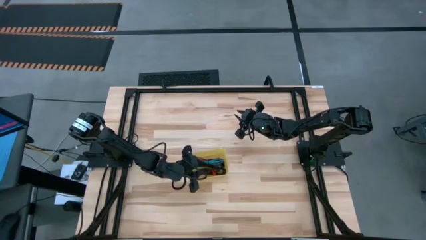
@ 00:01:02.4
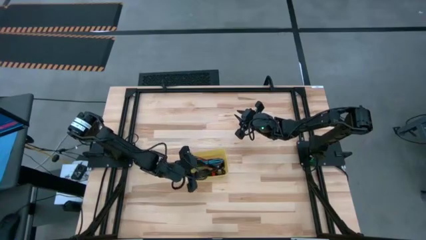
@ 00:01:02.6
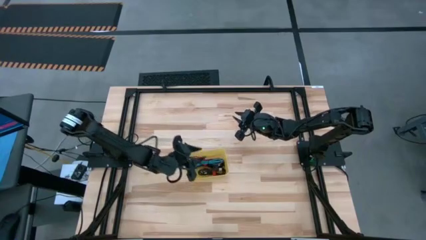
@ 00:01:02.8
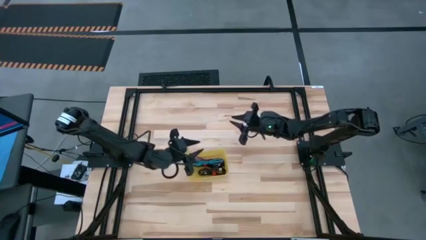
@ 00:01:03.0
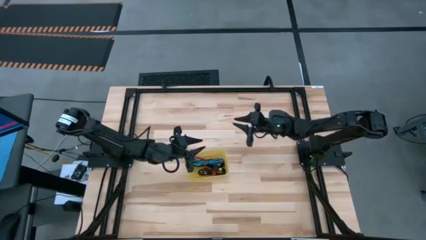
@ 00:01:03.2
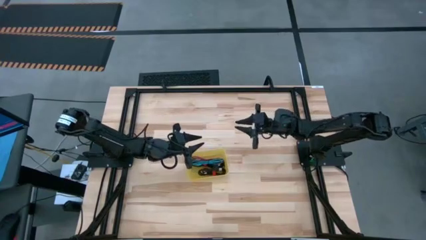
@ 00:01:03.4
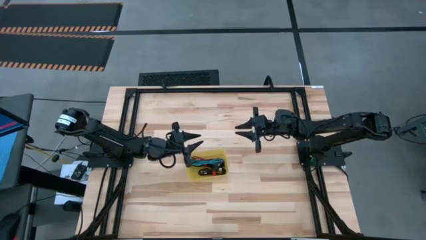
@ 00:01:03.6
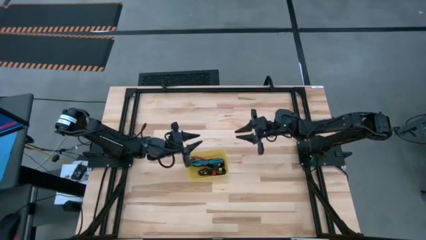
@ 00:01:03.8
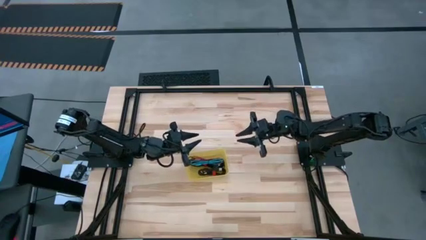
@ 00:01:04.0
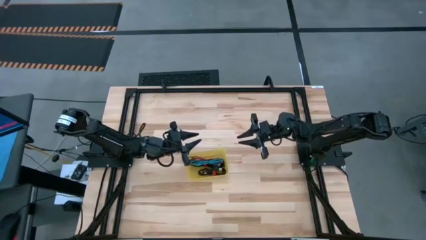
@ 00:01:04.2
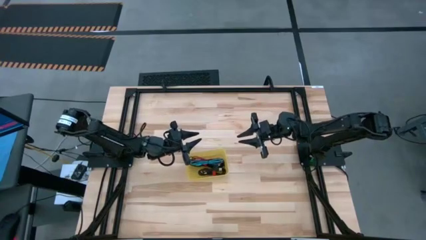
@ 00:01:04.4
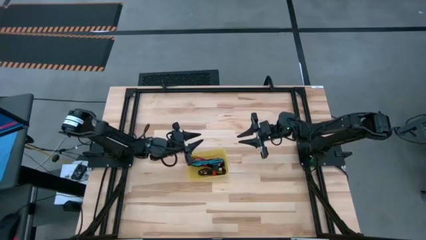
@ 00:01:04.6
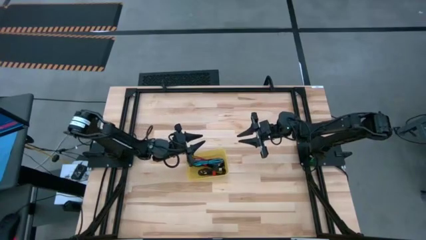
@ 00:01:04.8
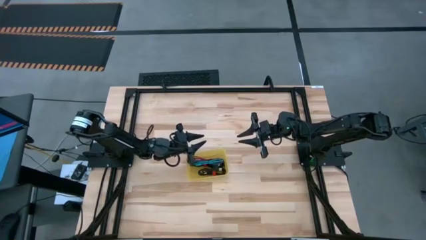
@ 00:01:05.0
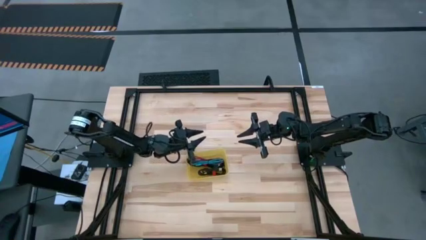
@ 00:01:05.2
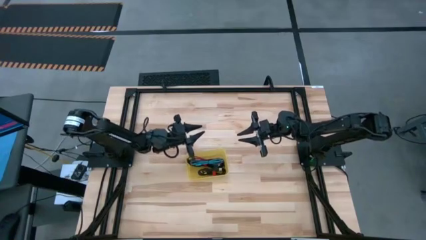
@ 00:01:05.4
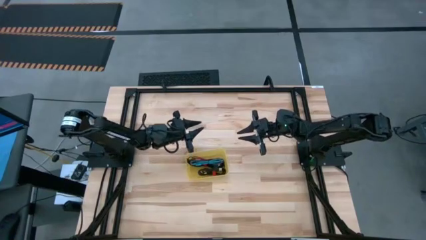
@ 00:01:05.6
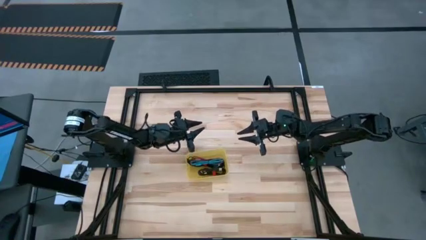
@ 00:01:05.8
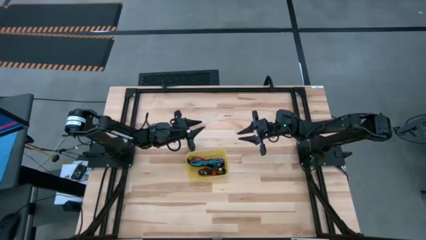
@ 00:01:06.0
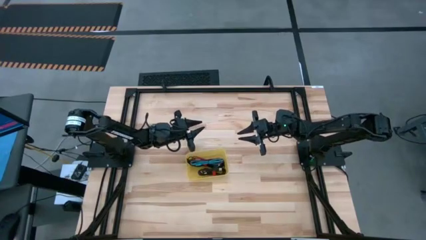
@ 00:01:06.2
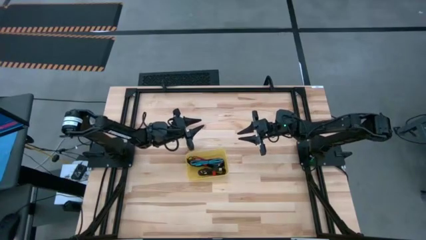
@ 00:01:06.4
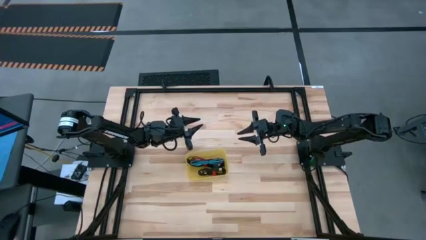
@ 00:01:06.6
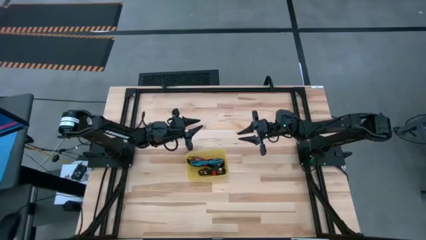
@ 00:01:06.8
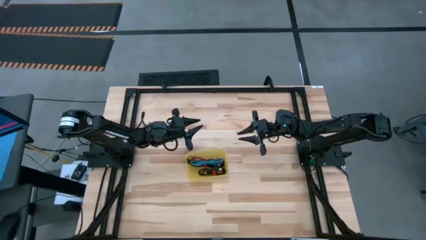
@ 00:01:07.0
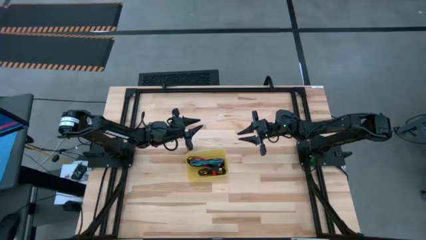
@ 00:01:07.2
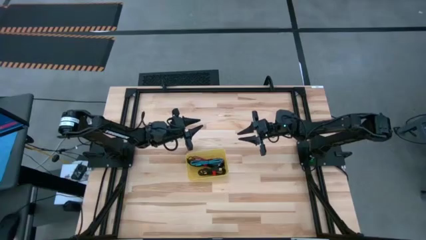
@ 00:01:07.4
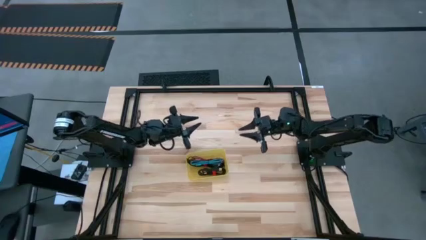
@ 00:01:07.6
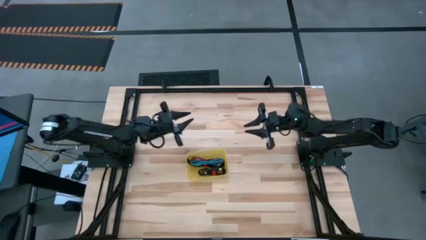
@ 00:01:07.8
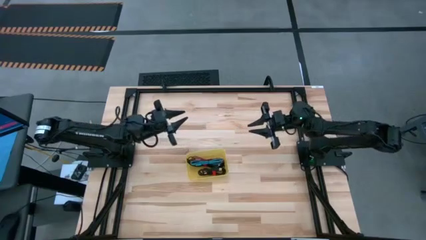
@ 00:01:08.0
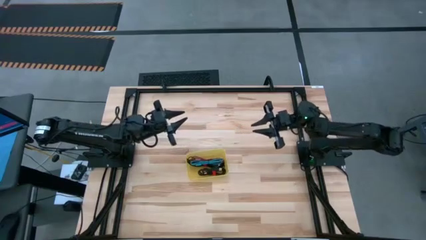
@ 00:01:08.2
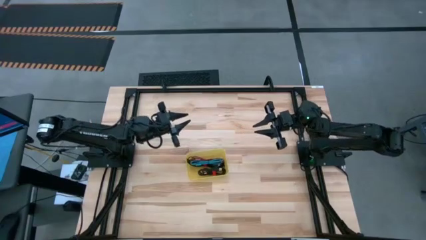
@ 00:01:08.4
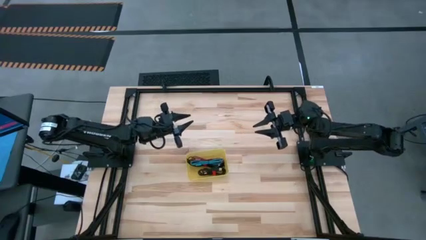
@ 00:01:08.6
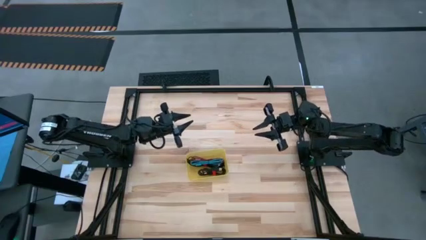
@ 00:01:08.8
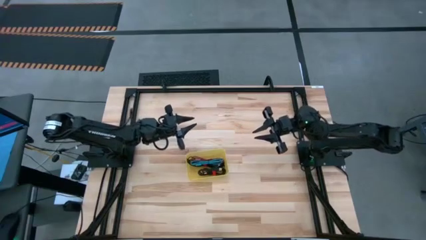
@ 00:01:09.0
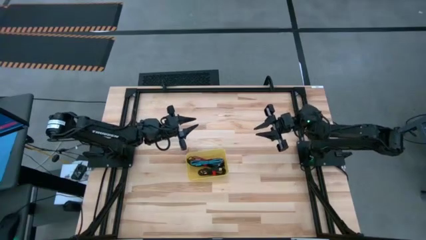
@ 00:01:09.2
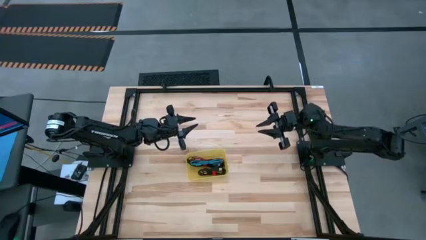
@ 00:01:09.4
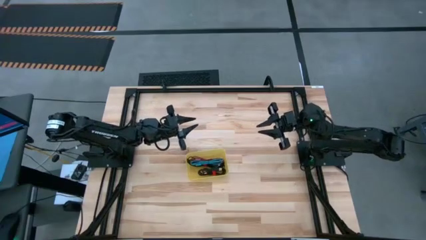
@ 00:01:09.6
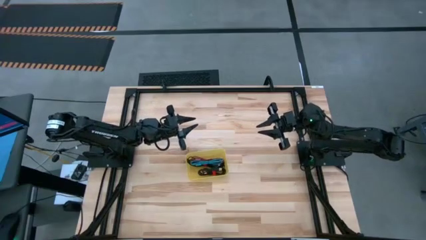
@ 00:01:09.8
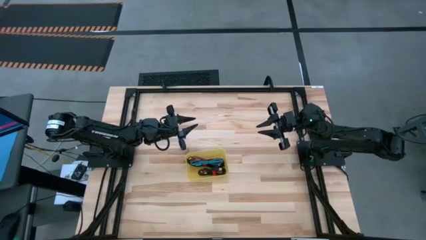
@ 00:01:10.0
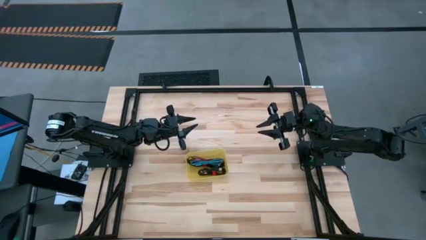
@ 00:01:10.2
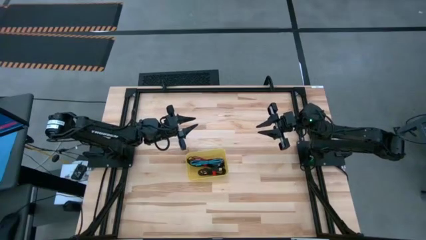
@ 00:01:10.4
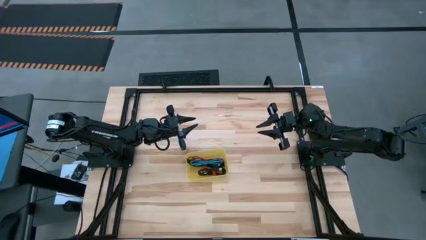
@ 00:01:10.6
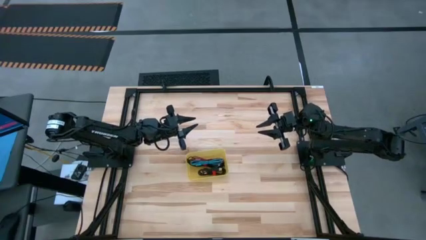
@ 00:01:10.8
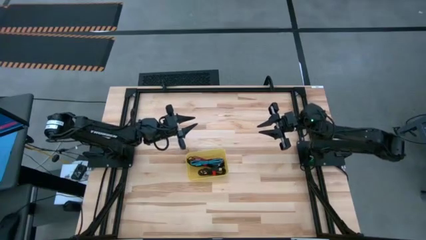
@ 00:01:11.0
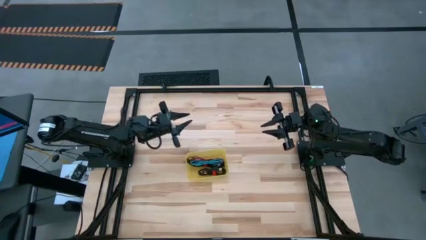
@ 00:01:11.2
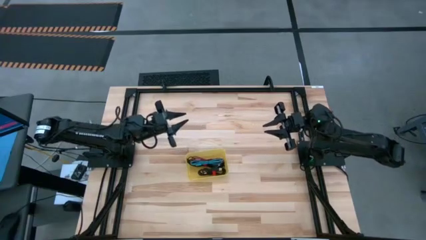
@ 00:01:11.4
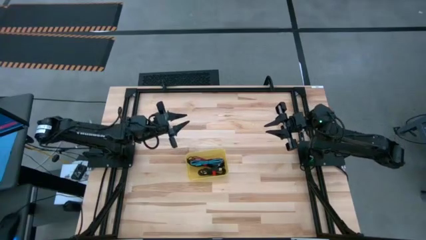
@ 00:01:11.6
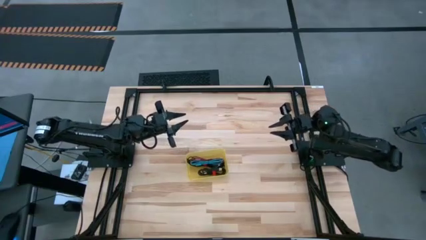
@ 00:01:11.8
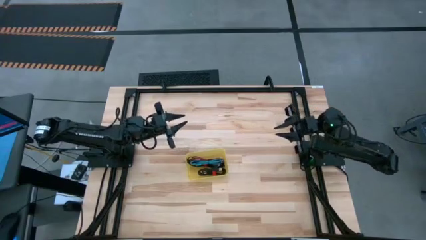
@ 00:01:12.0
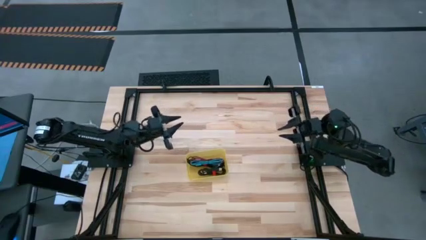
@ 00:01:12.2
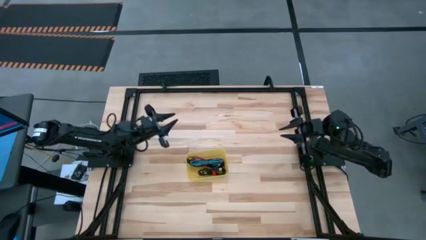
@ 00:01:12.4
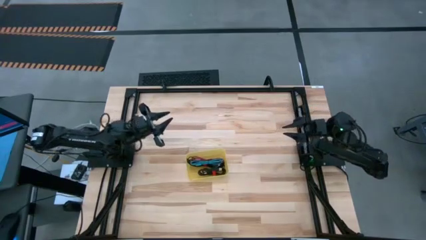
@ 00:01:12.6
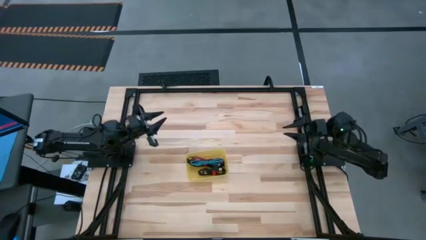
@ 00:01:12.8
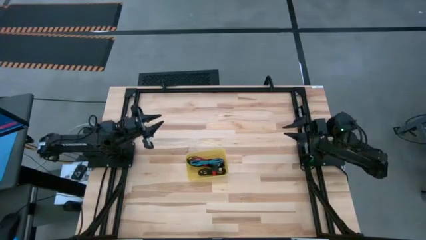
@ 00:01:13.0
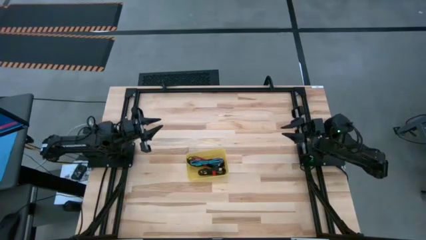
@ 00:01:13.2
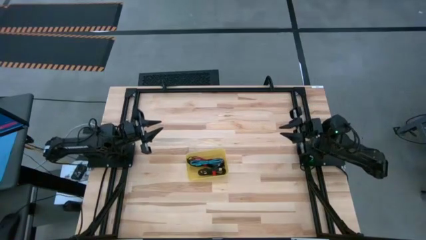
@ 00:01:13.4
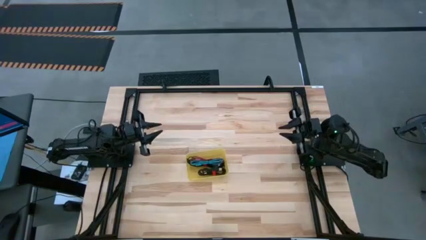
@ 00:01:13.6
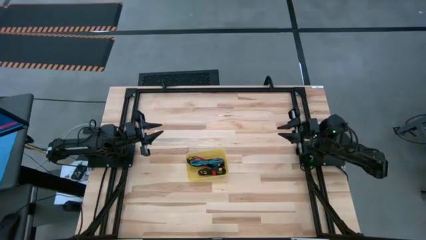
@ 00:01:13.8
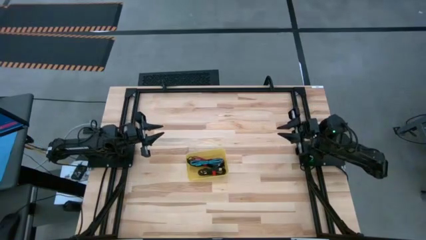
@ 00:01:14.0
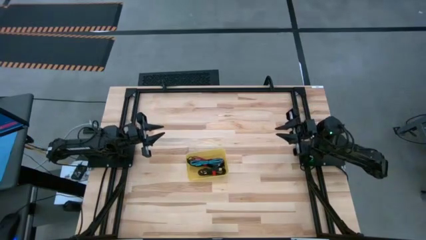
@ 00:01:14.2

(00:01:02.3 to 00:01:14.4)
Task: Pick and place USB-C Cables
Return to Home Position
